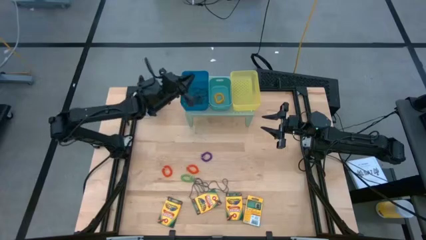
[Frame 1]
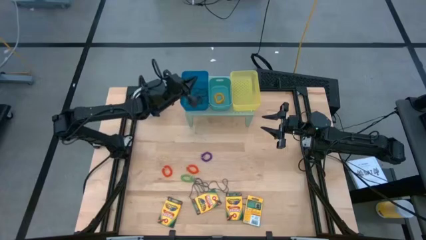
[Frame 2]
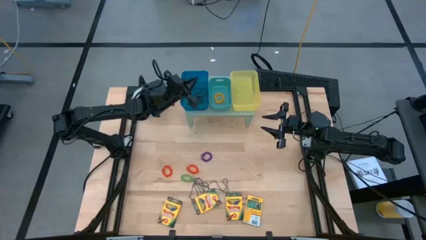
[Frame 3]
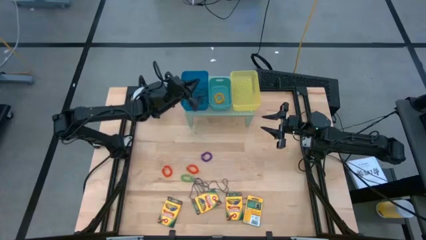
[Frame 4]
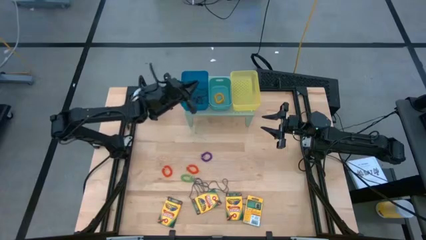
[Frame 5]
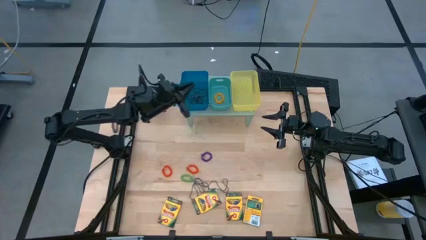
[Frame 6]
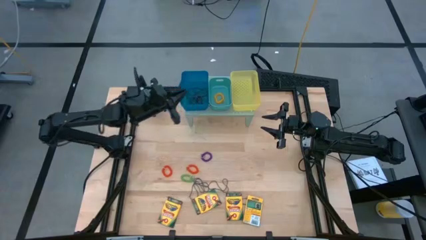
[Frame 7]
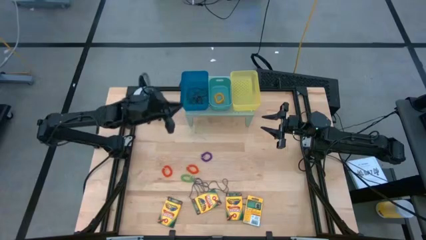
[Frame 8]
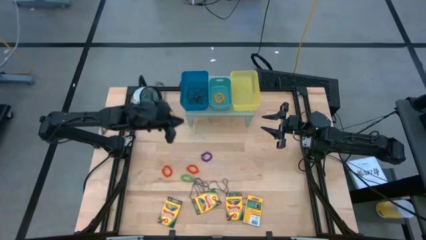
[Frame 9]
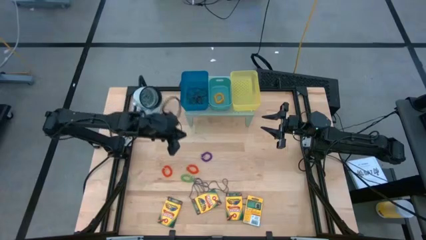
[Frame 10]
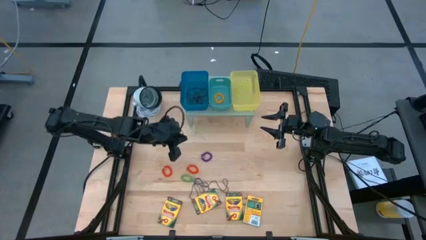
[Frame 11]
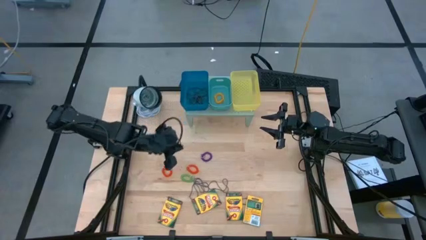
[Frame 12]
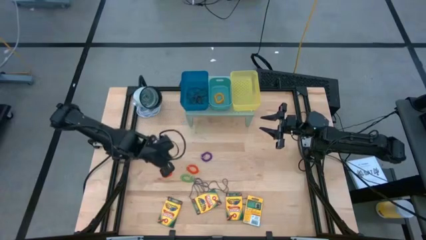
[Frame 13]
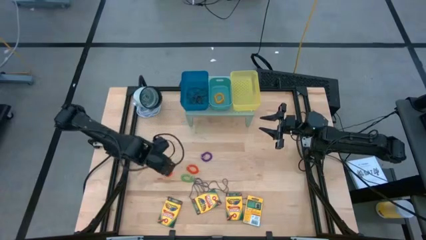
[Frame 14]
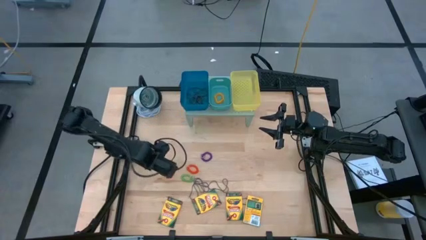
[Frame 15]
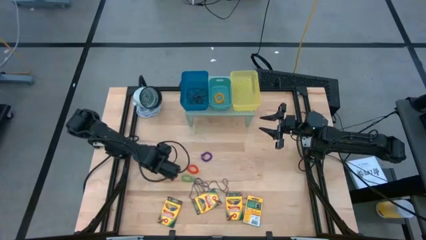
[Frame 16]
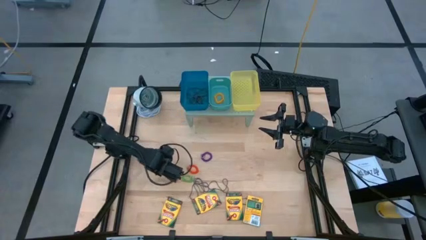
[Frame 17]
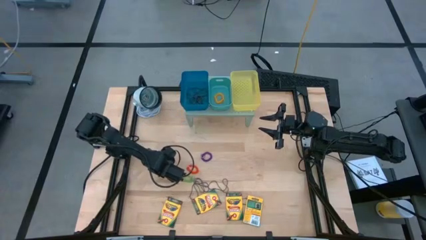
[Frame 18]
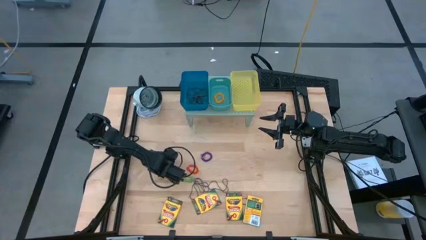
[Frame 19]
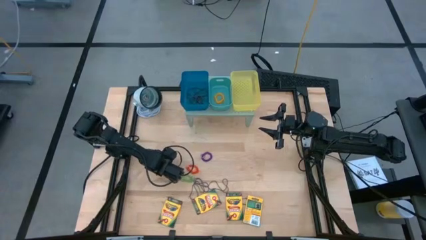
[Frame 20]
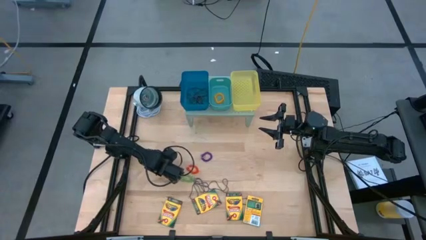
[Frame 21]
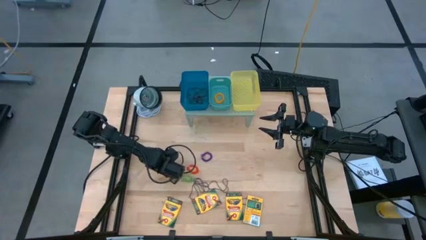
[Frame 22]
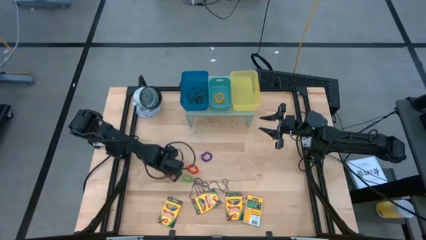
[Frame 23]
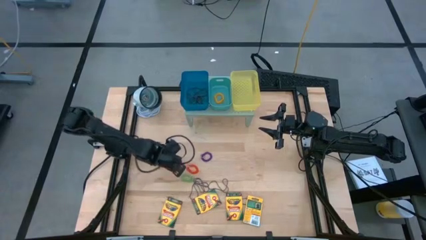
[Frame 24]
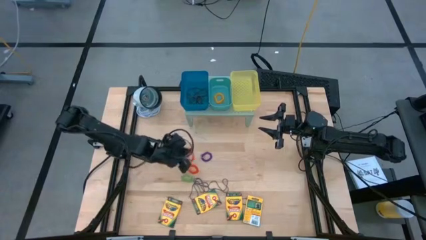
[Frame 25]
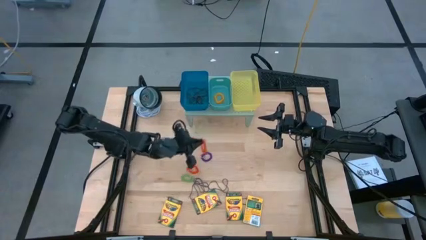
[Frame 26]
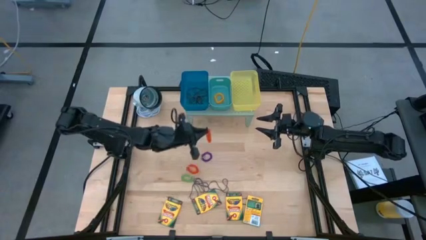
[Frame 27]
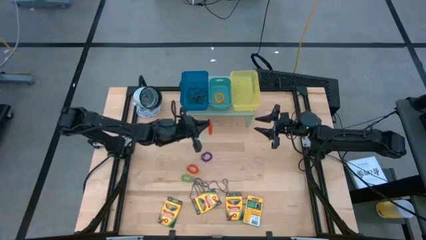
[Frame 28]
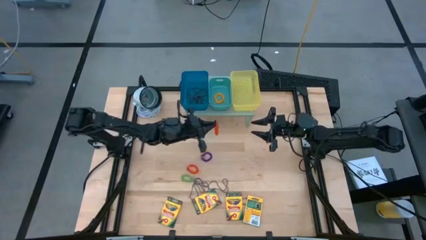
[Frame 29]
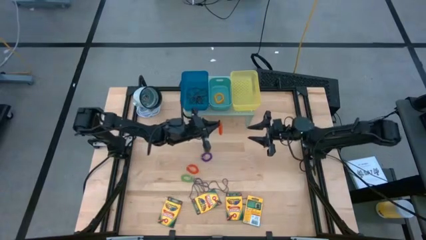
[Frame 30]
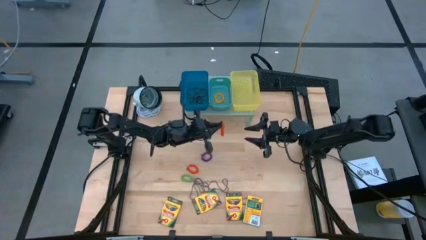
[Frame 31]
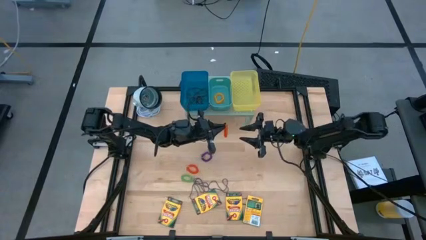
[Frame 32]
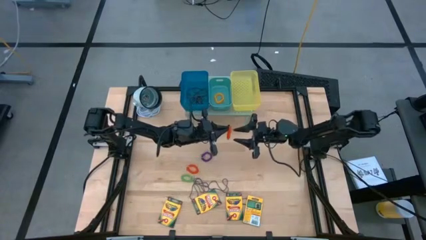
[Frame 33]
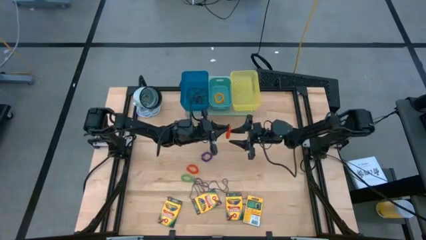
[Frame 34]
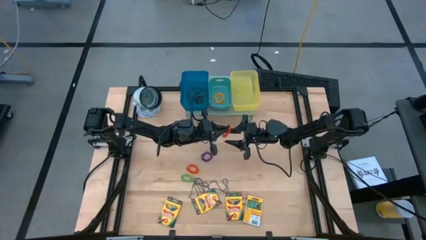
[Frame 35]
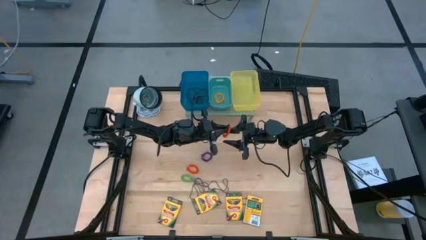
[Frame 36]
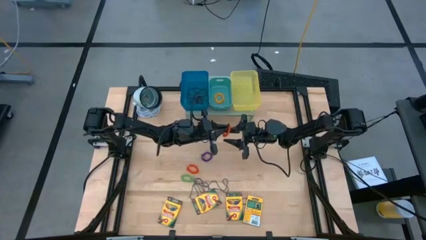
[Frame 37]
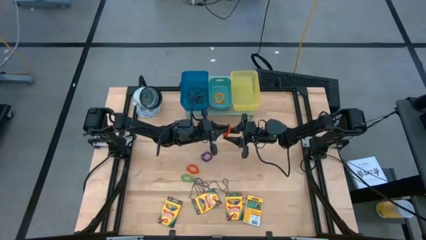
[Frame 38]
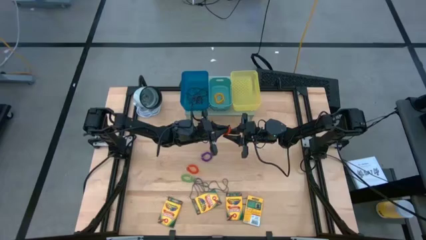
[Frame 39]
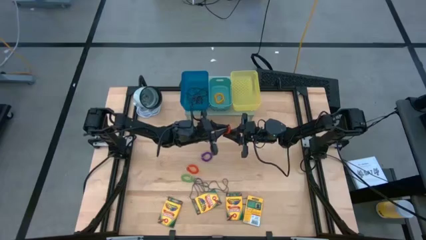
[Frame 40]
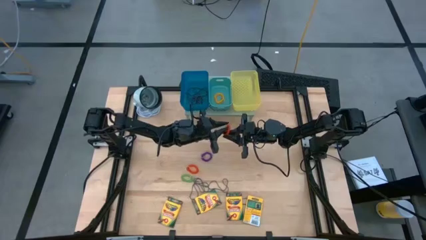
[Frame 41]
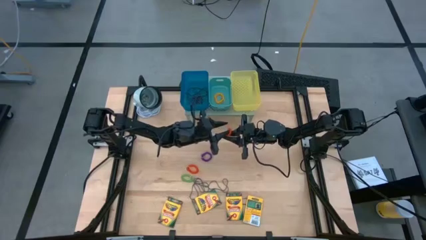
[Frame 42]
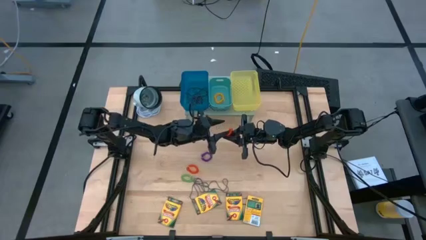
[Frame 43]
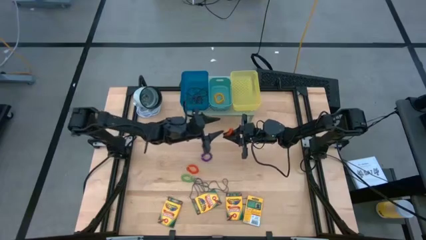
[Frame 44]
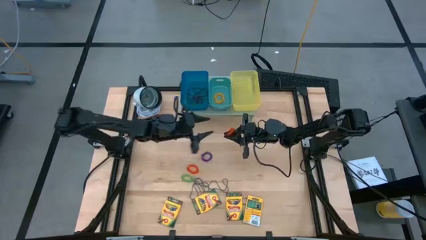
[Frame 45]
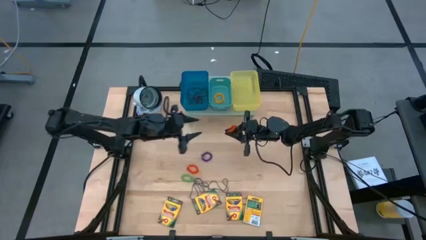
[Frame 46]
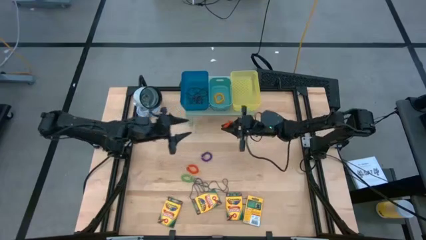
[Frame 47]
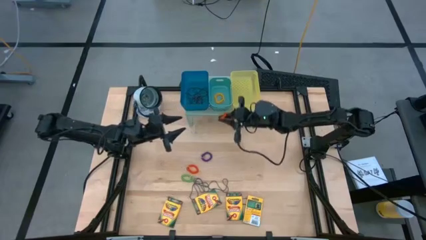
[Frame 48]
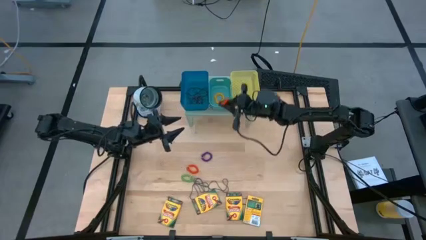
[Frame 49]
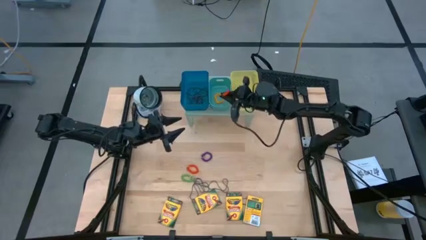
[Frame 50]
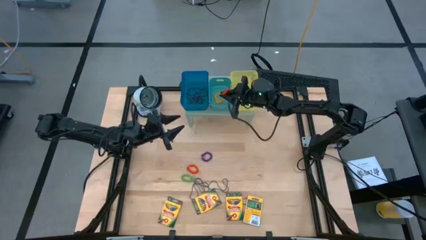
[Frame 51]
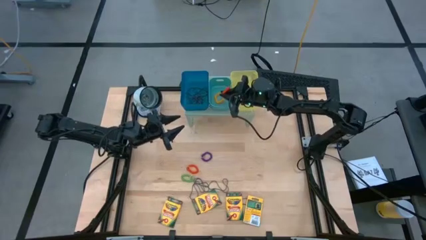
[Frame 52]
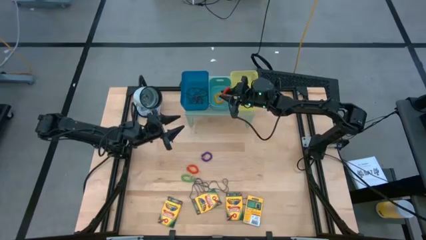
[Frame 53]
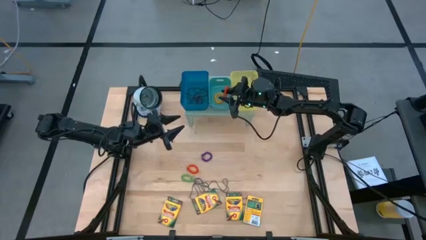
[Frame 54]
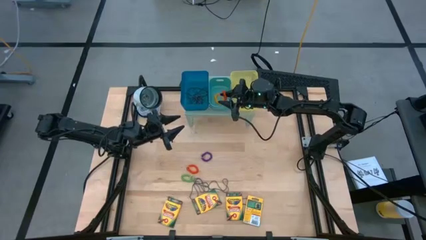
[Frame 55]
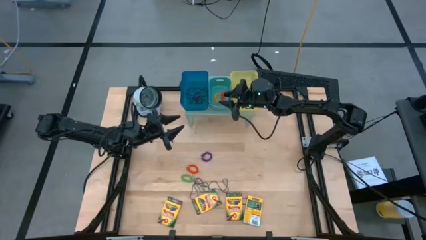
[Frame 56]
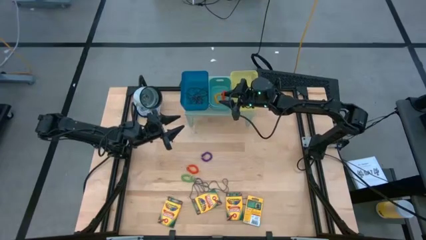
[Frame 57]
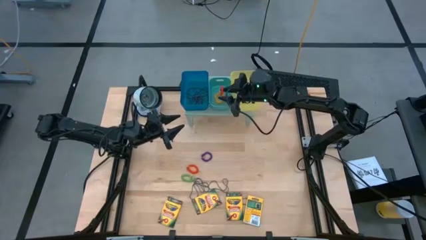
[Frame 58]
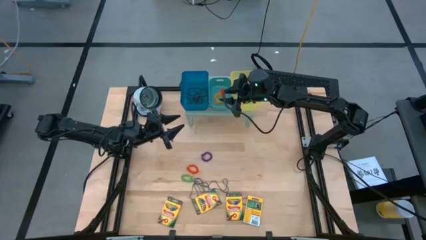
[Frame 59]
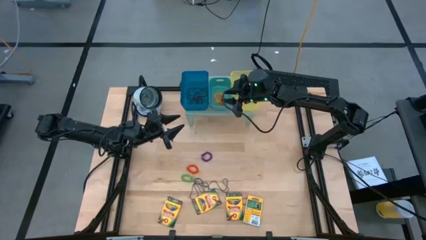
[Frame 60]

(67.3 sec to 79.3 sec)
Task: Pick & Place Office Desk Supplies
Put the left orange spring keychain into the green bin on the shelf

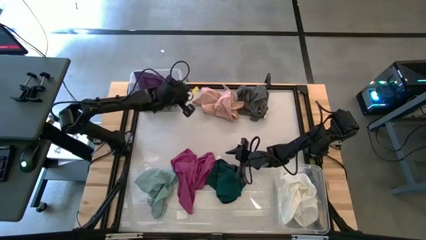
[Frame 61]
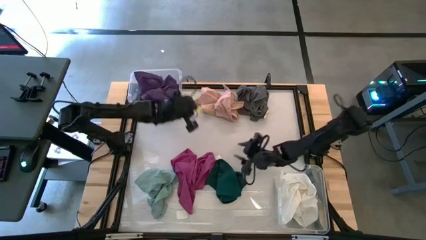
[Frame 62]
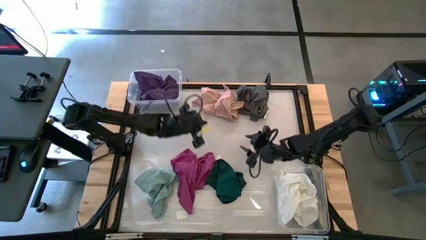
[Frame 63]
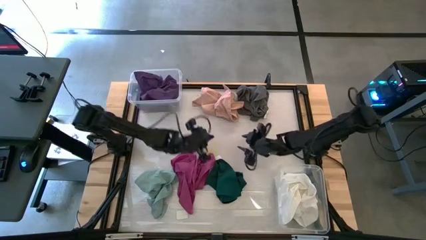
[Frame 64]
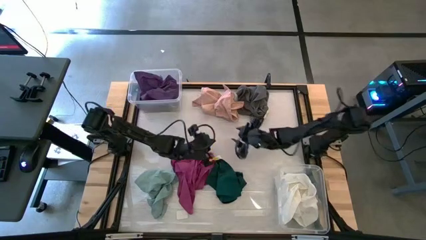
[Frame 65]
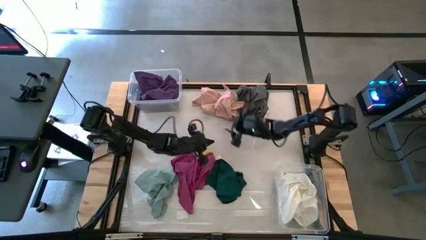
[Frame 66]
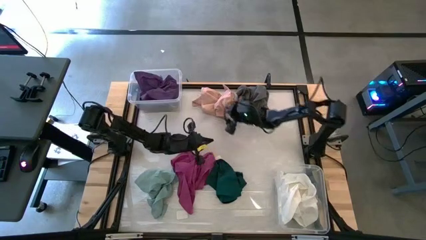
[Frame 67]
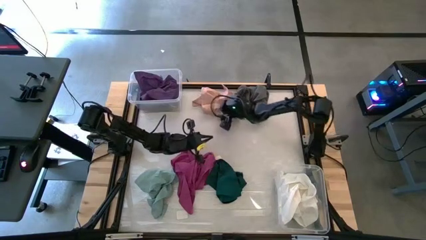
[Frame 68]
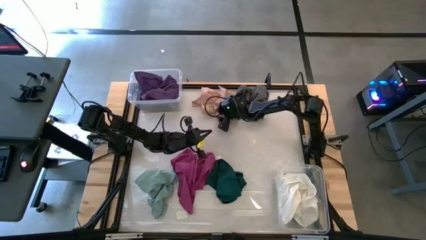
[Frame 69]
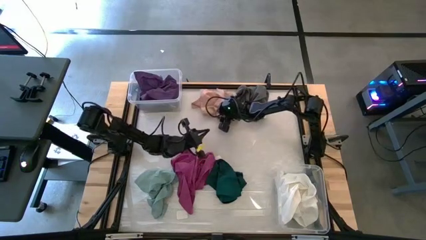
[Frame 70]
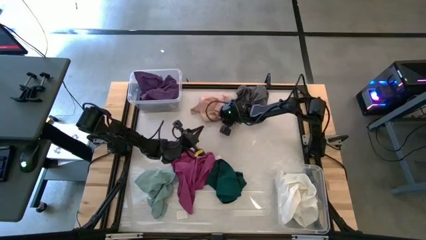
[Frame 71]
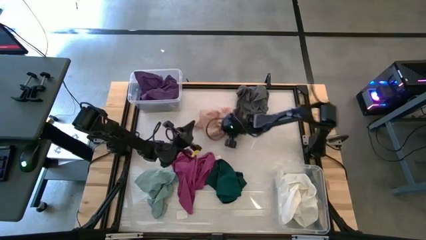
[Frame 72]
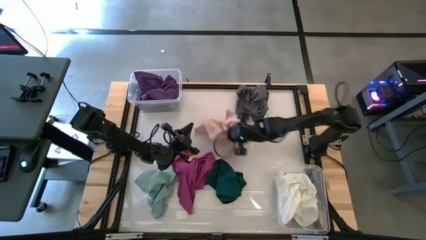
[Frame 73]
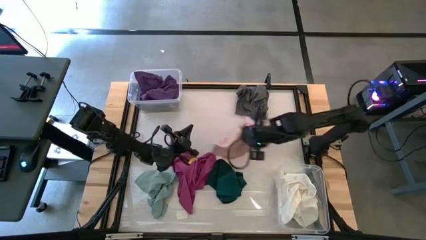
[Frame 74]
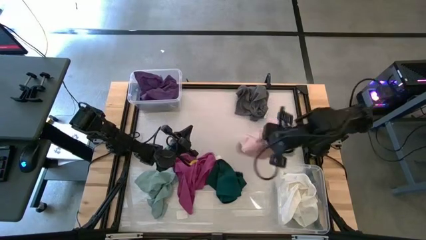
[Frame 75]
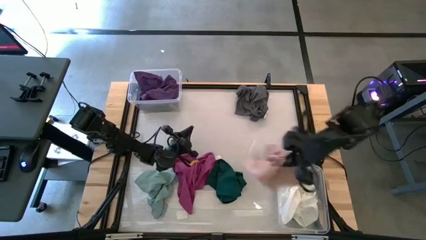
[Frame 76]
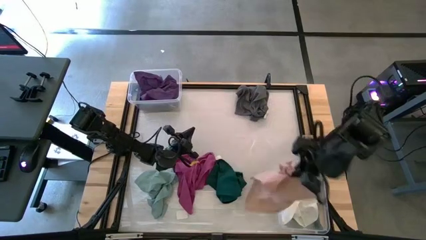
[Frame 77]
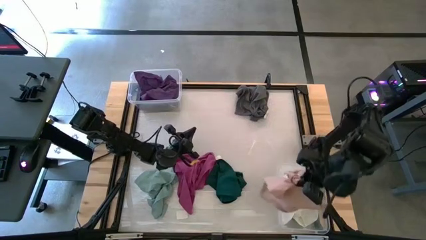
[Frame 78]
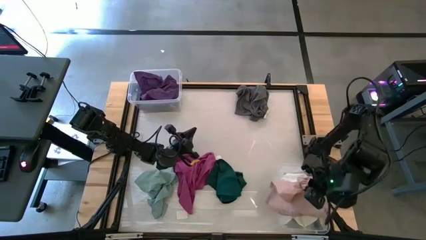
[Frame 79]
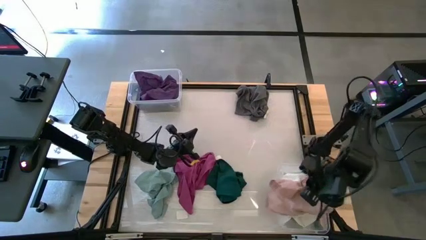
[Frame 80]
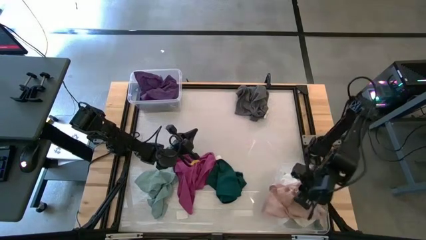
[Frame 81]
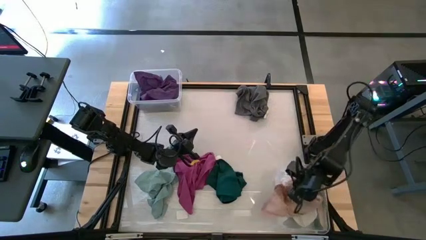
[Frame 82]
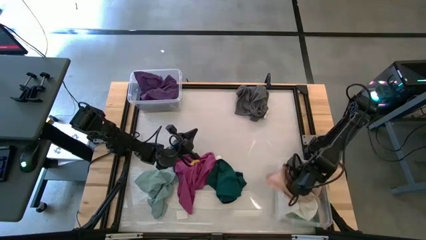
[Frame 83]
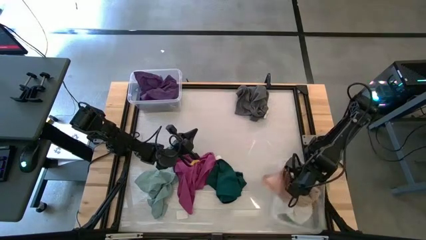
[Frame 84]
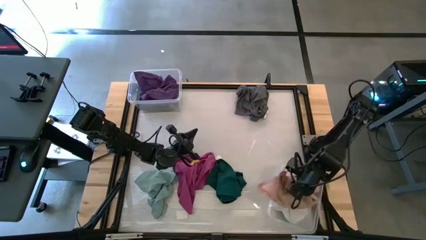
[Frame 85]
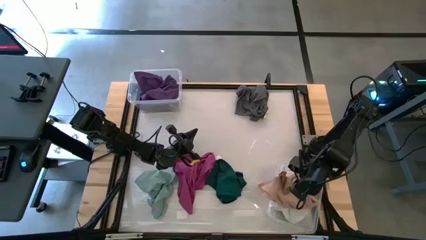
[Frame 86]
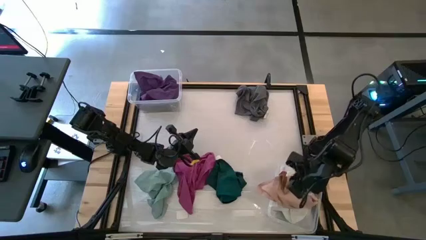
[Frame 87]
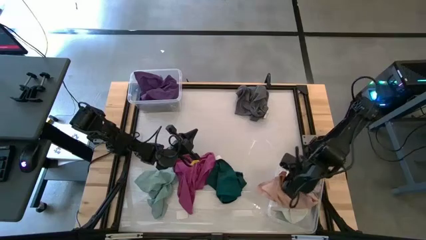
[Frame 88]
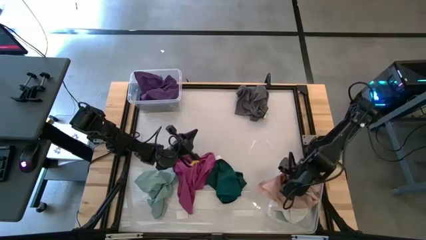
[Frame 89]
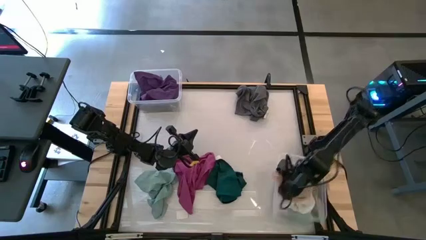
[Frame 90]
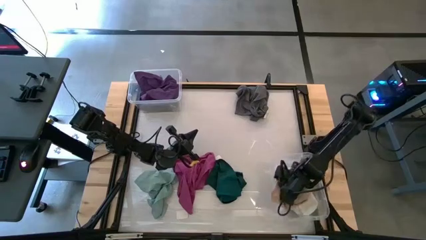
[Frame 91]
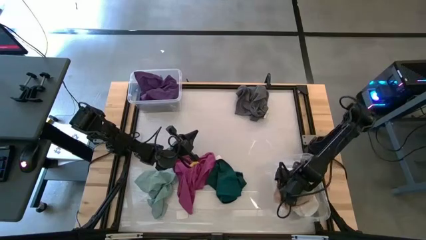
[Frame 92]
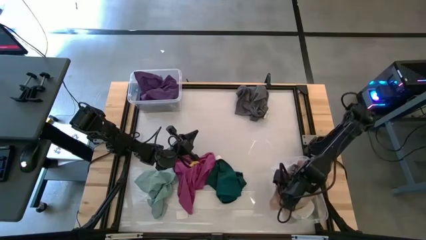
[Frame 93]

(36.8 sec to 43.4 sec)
Task: Sort microfiber towel by color & place in baskets
Put the light orange towel into the bottom transparent bin
